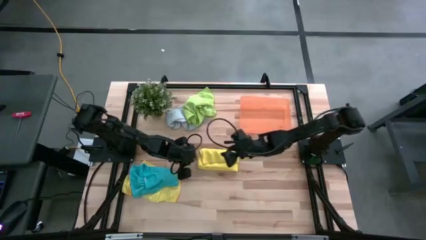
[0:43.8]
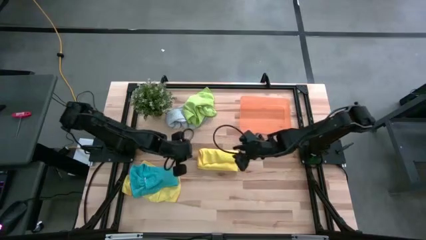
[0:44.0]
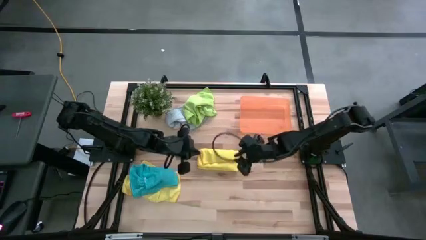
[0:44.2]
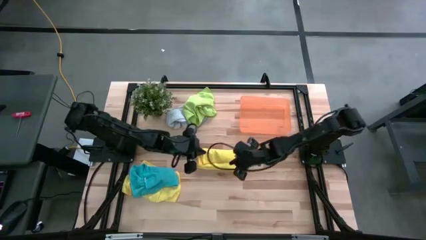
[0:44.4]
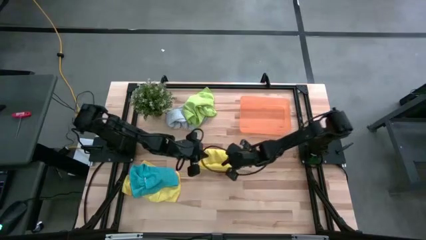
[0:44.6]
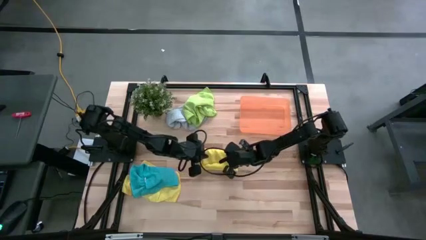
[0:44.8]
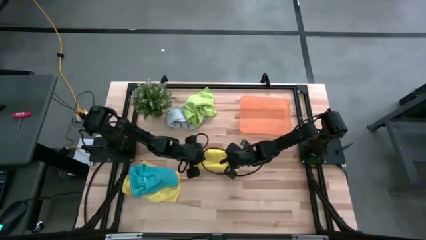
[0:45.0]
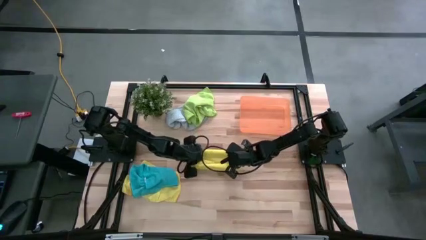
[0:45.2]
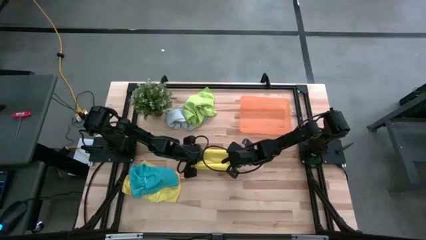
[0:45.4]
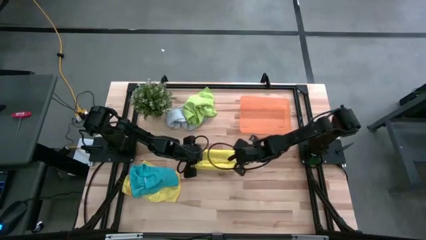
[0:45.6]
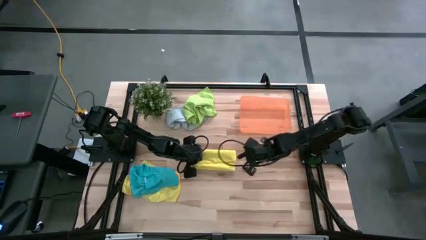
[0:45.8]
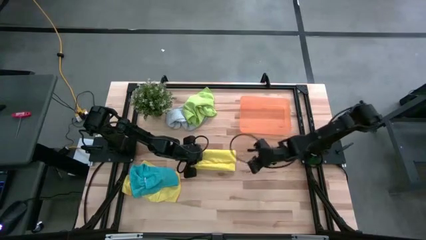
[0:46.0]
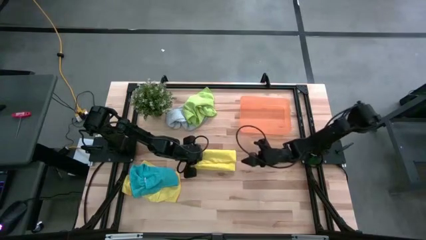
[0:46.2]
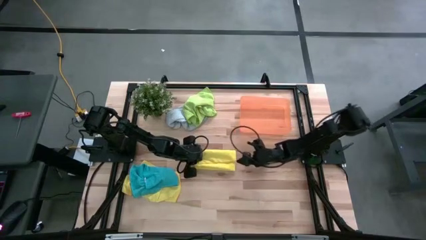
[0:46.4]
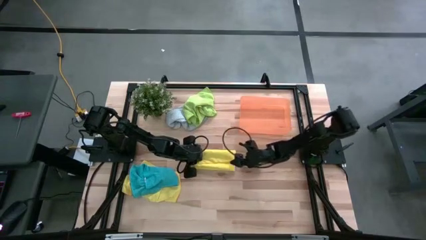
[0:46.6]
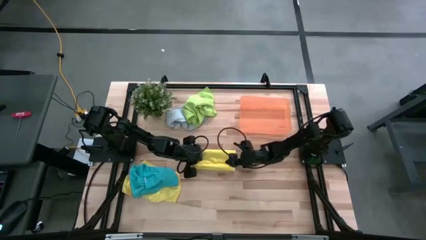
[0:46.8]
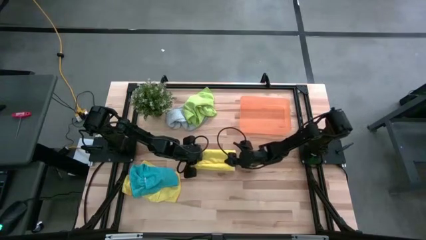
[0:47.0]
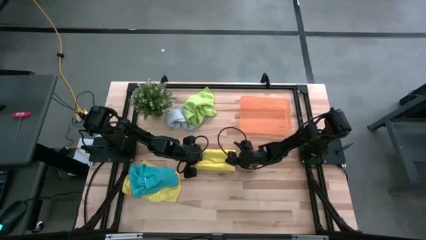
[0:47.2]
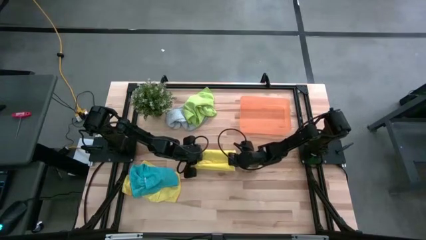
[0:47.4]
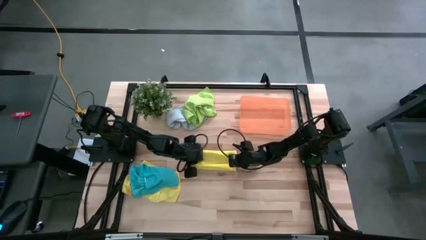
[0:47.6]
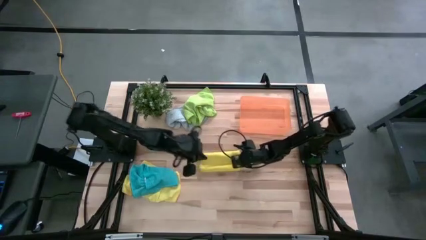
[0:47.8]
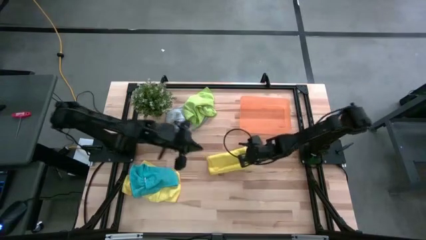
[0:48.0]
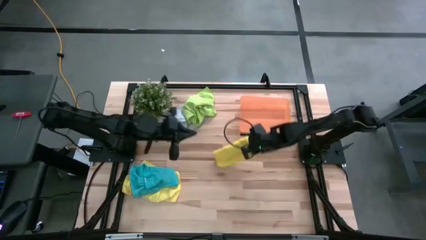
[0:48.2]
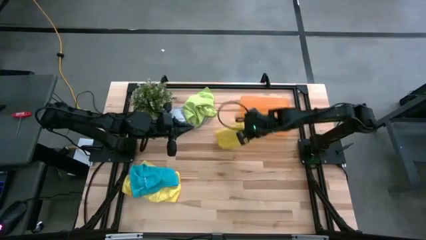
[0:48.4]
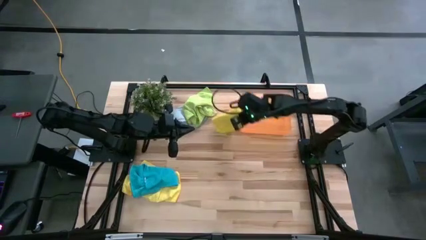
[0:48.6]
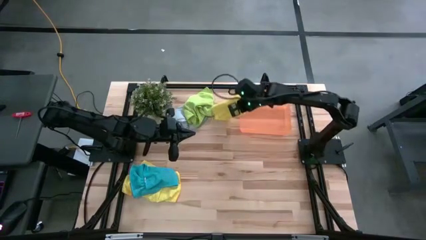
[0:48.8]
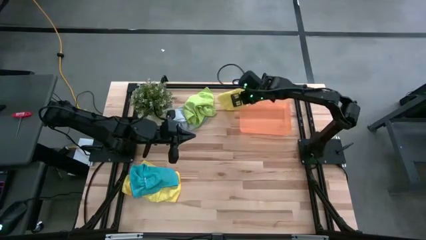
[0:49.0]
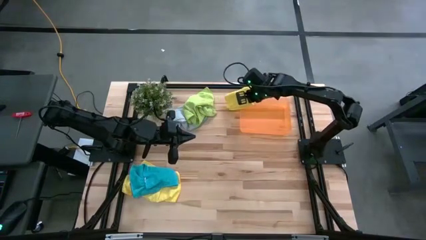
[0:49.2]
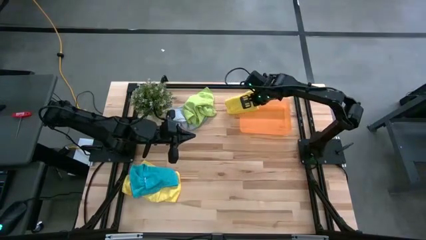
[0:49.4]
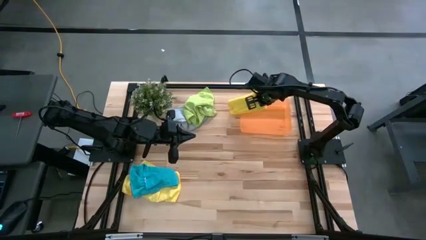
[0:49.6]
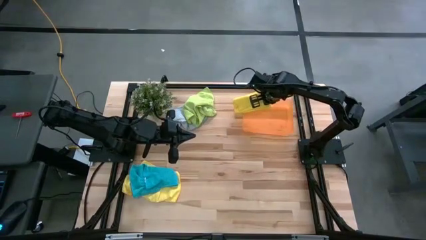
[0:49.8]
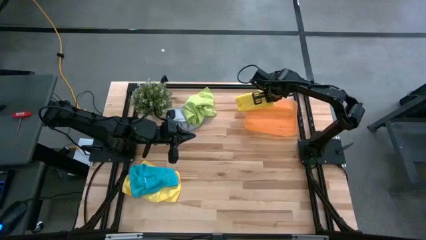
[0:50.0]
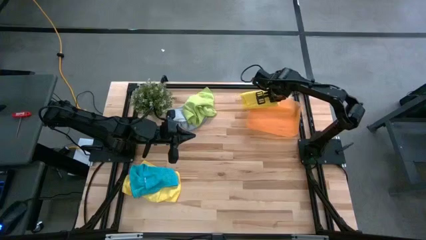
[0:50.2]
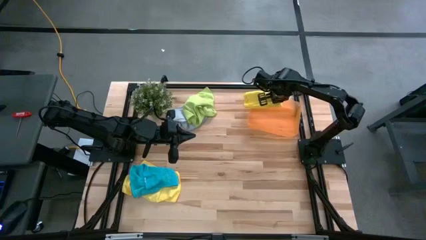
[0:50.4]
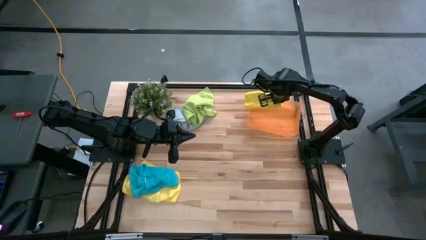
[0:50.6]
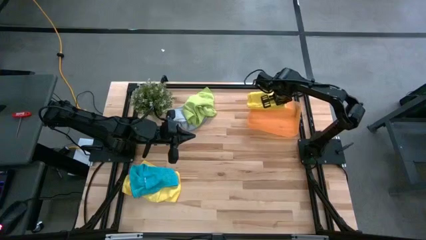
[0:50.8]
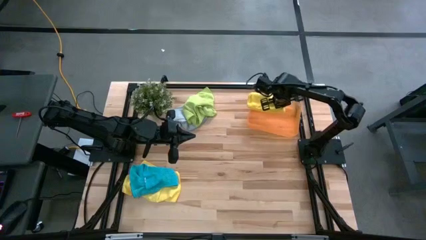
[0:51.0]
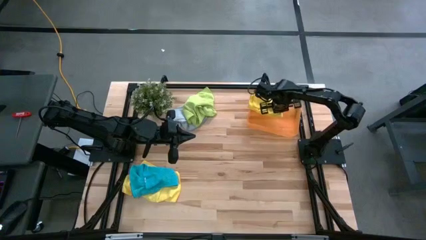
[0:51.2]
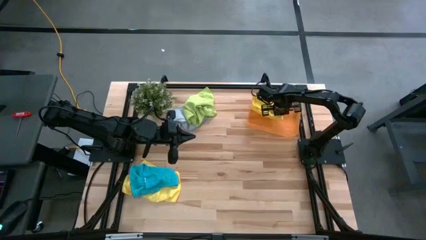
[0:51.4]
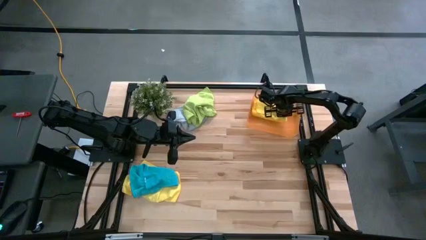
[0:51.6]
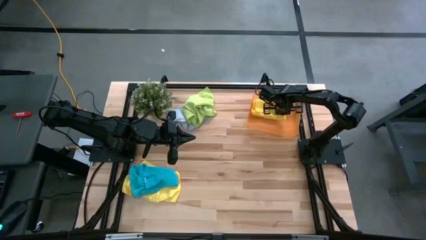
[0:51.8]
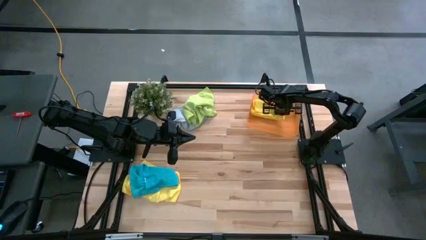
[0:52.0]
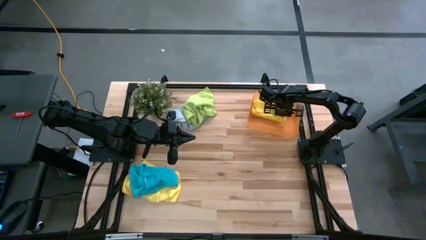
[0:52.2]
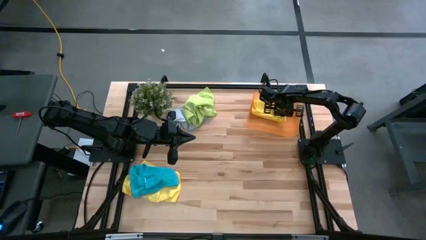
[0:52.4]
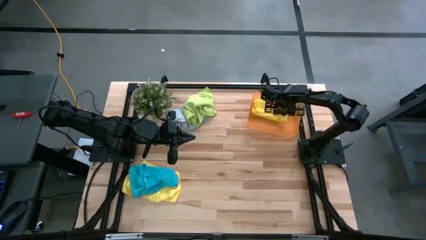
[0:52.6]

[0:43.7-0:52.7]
Task: Fold microfiber towels
Put the right yellow microfiber cloth into the orange bin

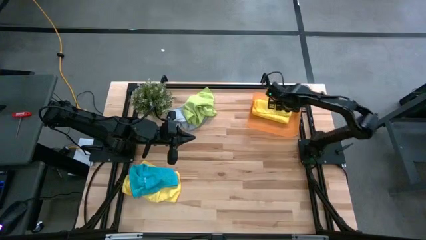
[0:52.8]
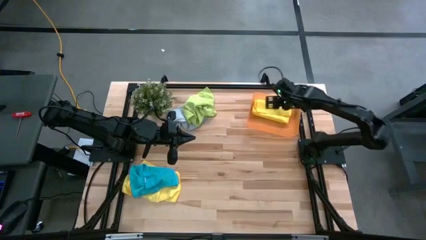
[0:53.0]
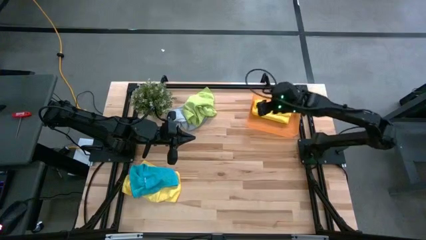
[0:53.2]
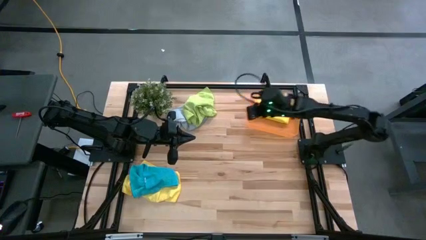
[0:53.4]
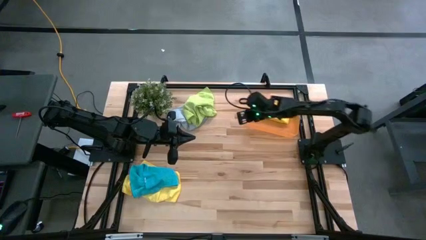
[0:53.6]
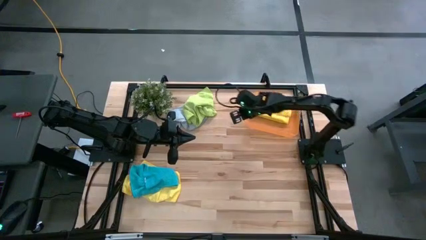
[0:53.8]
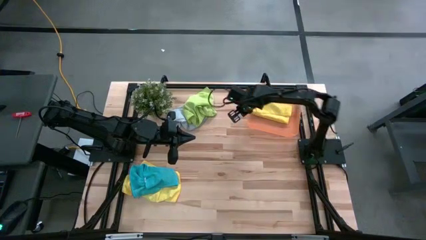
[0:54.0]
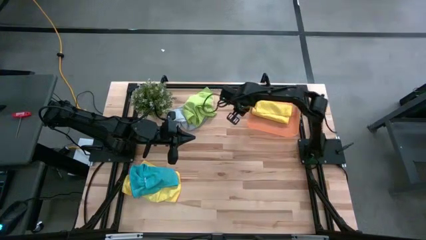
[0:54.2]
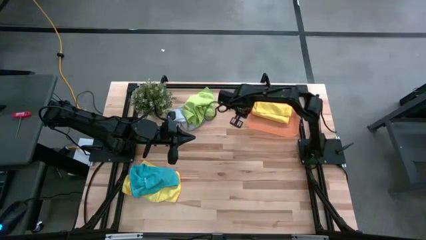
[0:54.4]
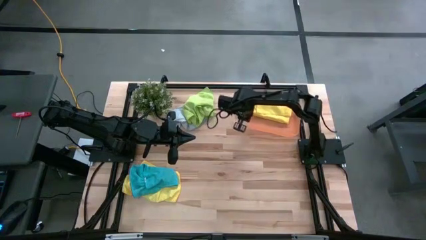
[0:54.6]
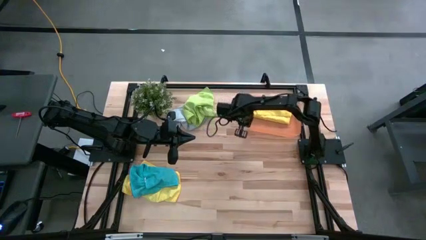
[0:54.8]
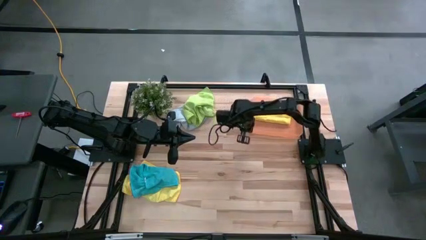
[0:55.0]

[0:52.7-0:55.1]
Adjust the orange bin

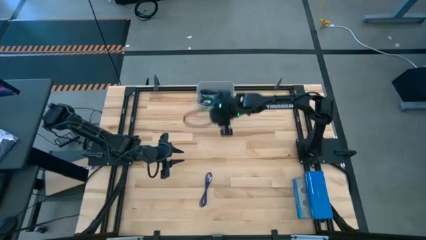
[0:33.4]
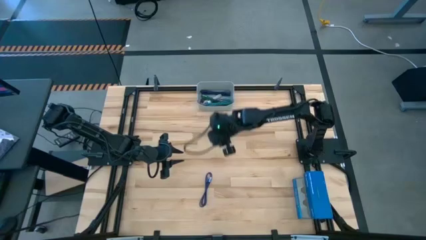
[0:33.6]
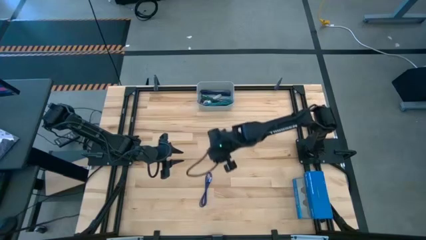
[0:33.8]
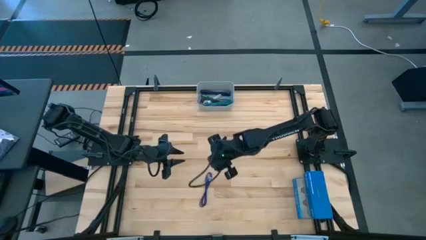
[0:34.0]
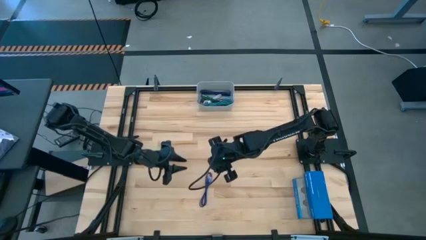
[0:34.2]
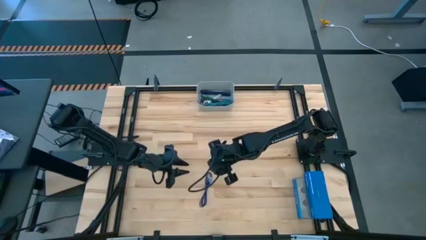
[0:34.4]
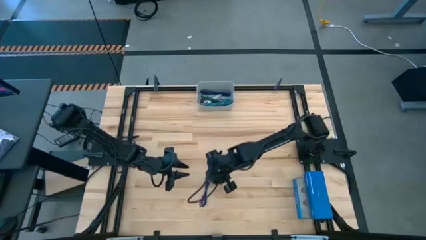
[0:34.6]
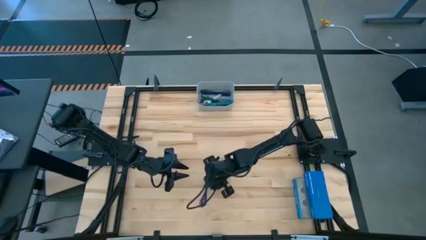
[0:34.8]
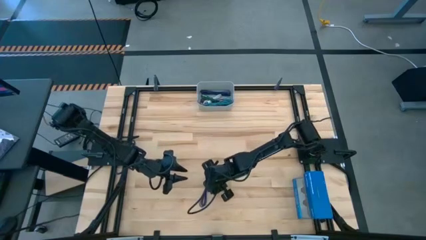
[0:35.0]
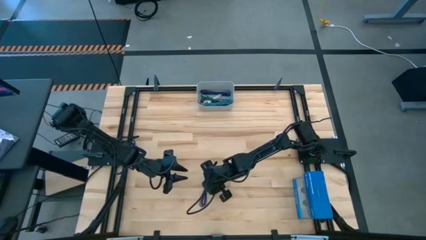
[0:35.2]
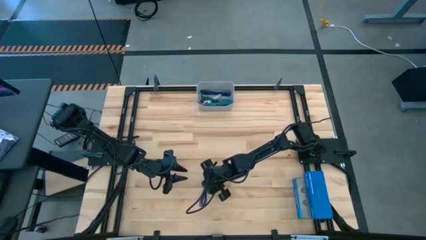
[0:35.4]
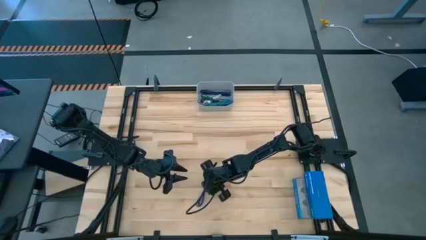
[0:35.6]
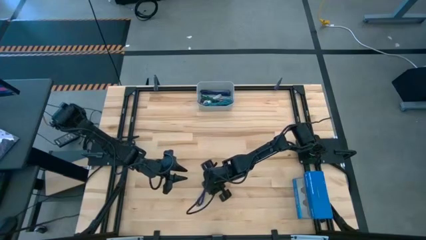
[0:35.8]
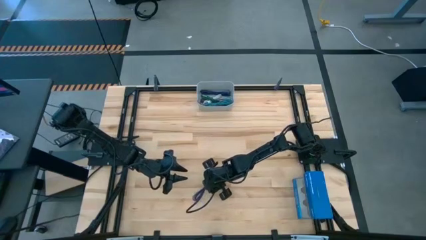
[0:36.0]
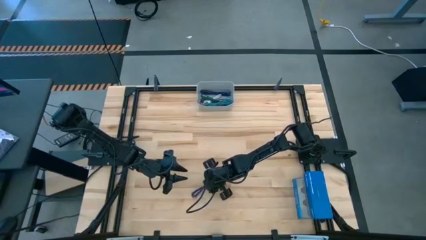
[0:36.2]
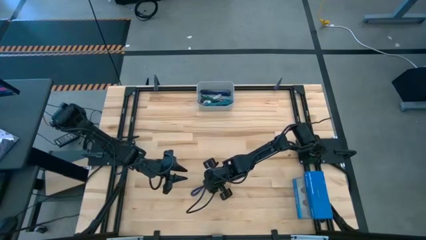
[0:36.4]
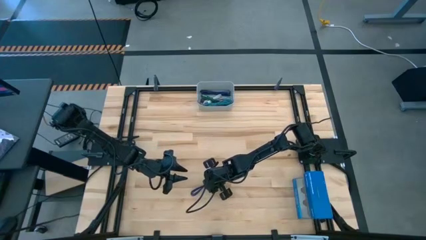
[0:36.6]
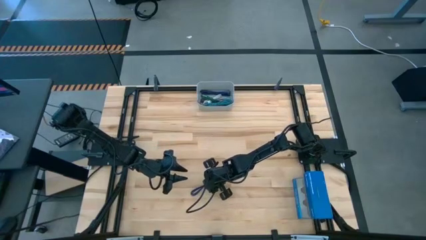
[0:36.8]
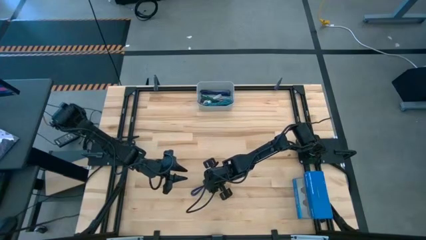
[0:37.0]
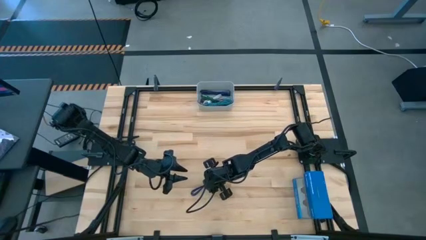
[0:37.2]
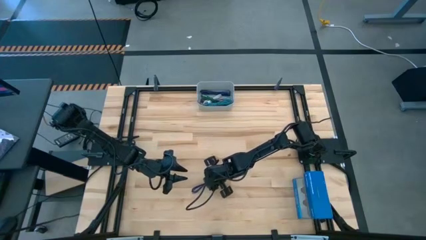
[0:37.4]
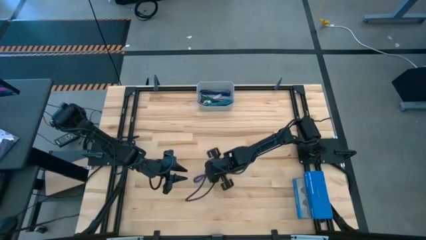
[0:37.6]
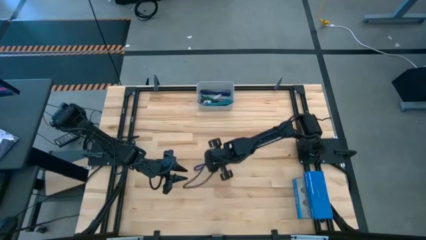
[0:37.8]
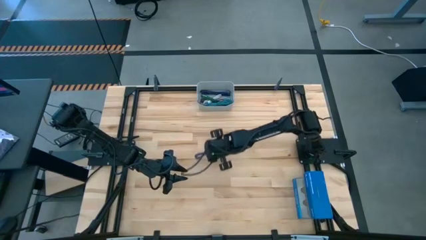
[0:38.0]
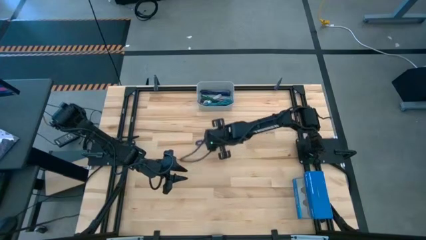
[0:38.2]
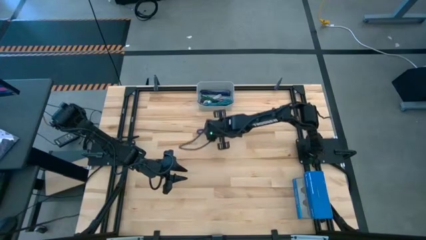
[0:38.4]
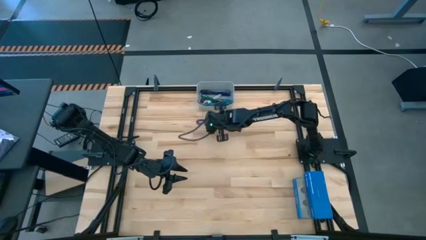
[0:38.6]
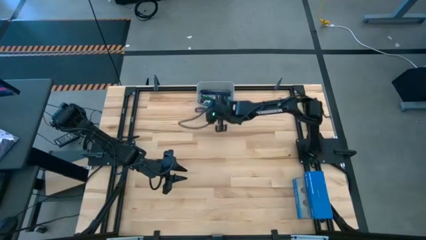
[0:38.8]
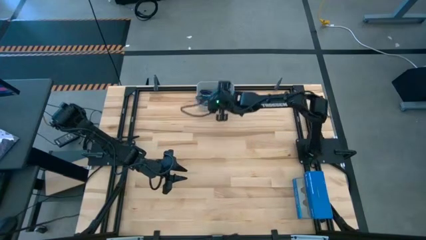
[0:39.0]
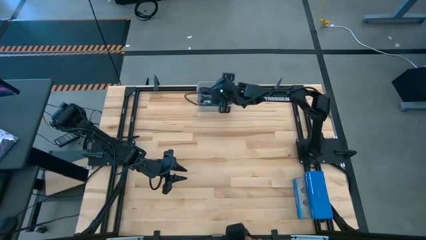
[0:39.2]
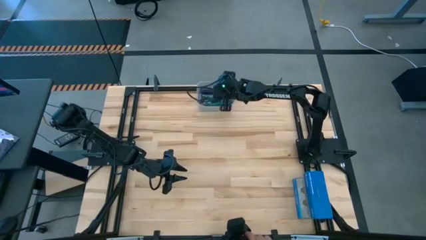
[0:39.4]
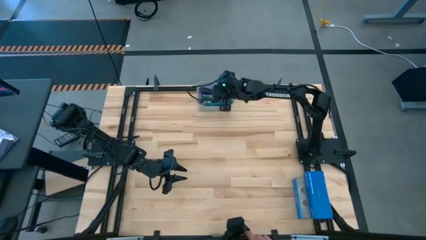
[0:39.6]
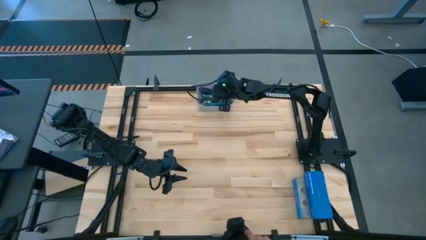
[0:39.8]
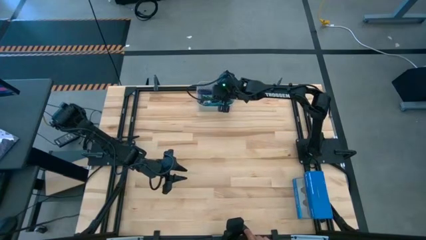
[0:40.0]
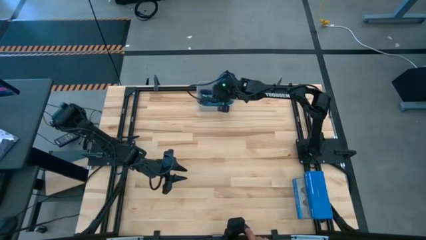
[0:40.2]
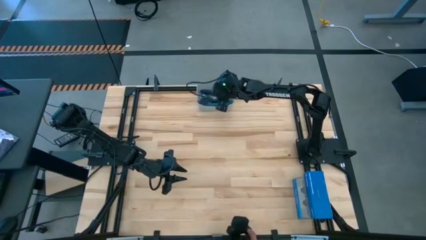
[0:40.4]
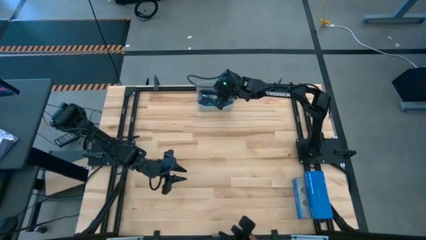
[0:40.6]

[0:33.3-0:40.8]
Task: Pick and place USB-C Cables
Put the dark blue charger cable into the gray bin
